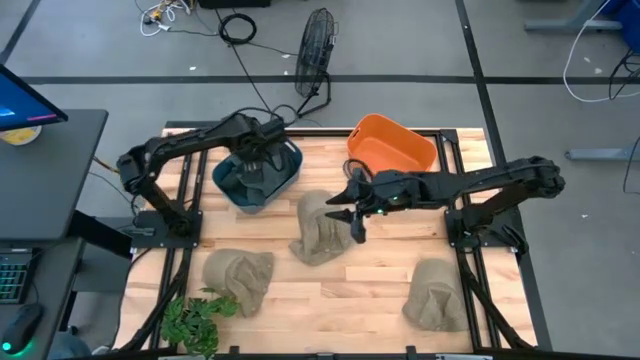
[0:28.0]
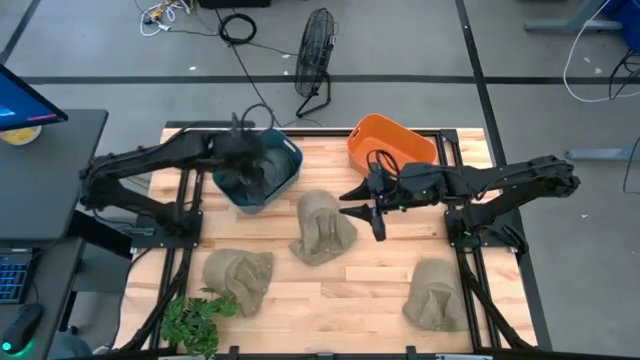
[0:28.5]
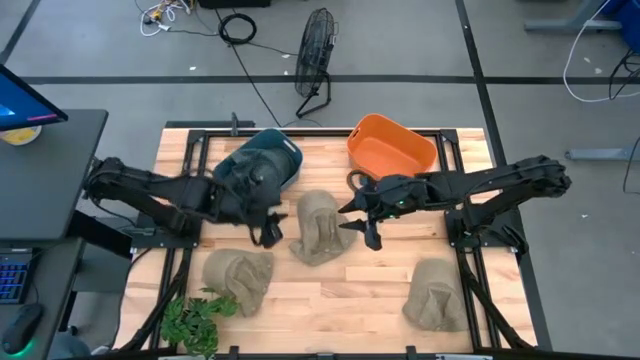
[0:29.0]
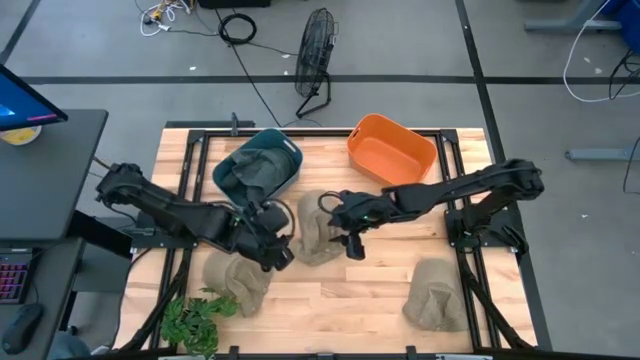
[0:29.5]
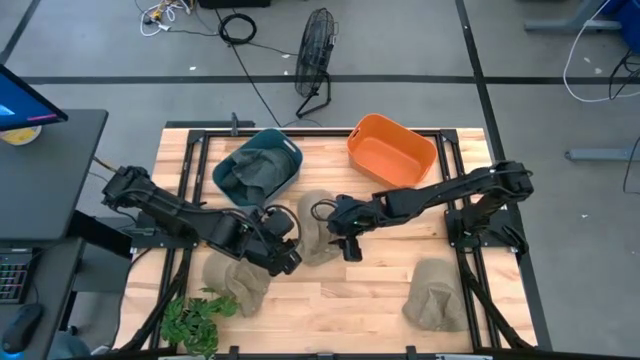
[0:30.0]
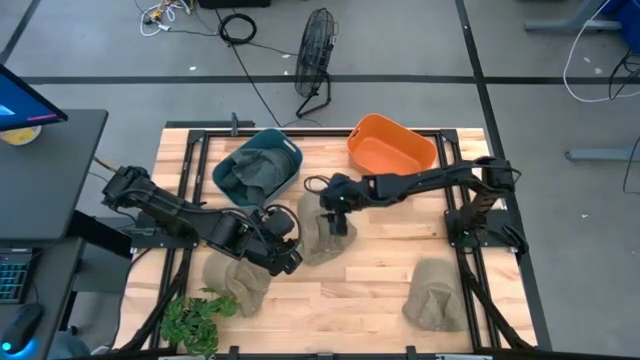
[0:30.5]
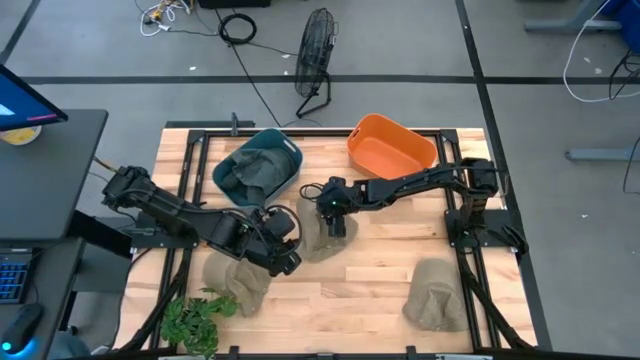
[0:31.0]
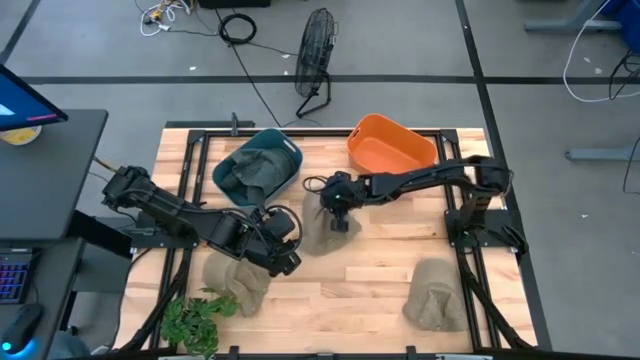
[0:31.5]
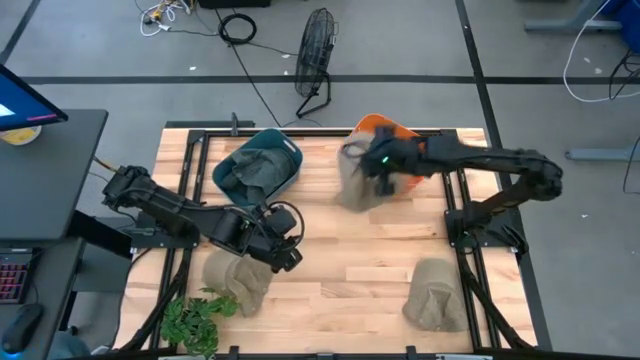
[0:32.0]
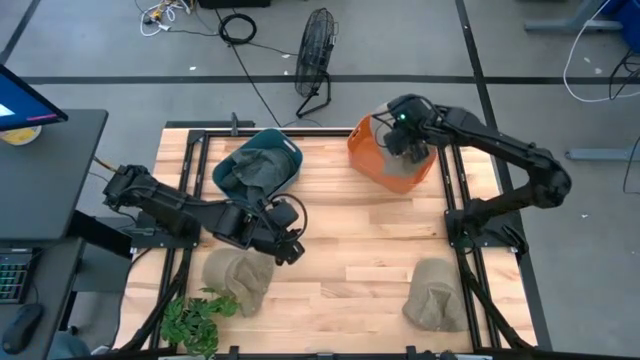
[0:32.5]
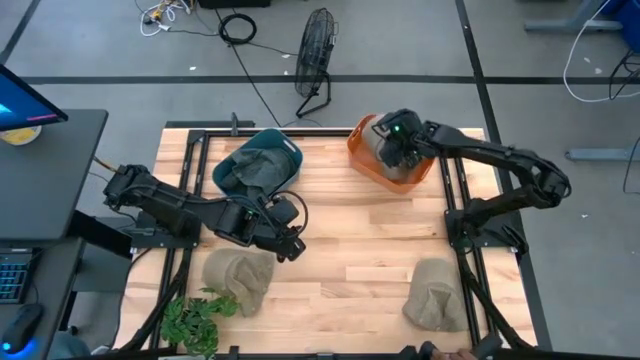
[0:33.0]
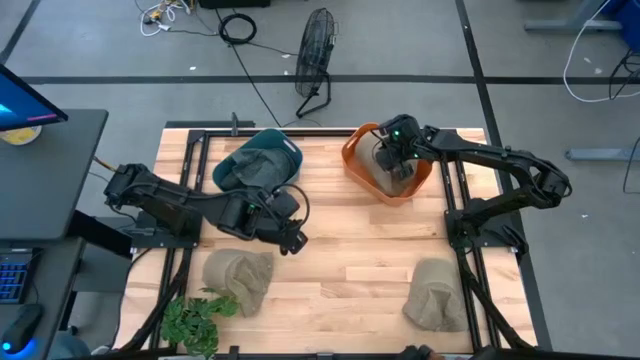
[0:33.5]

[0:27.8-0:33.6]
Task: Pick & Place hat
Put the top brown cap into the orange bin

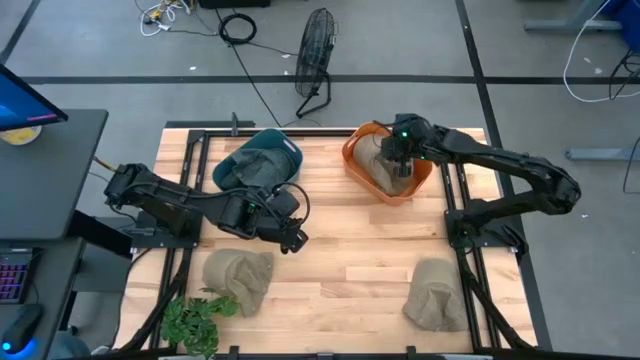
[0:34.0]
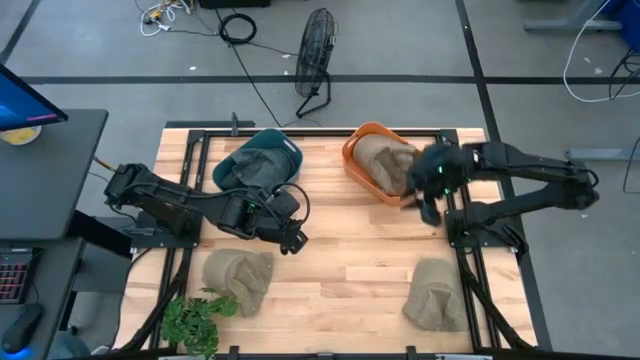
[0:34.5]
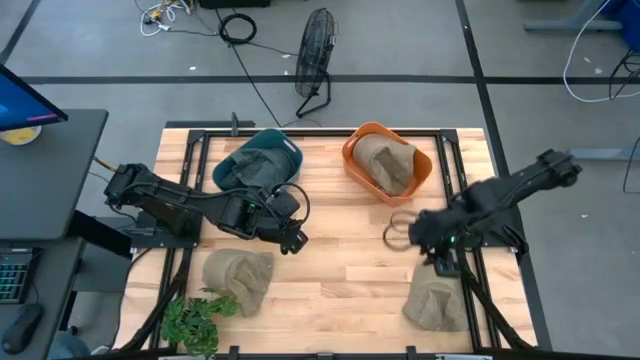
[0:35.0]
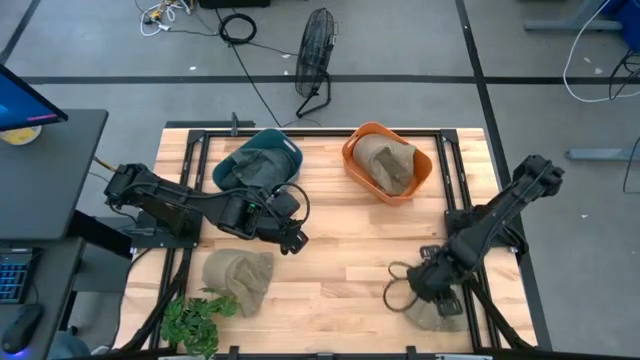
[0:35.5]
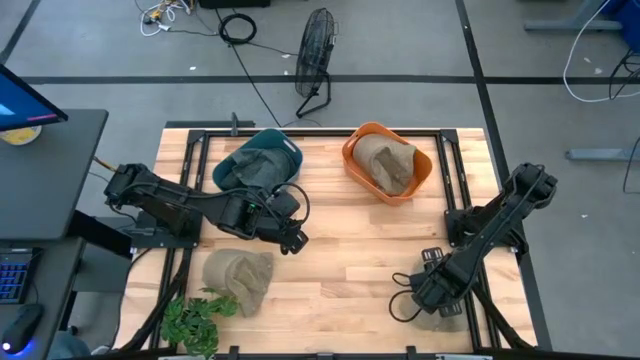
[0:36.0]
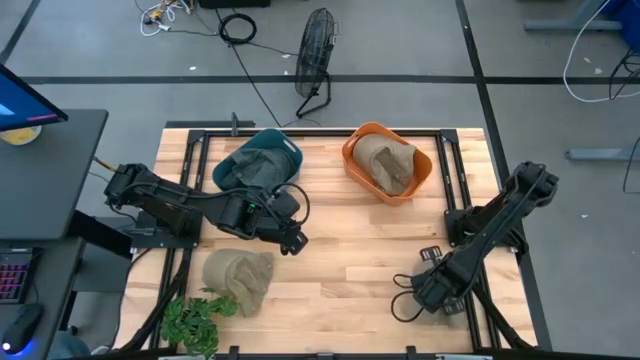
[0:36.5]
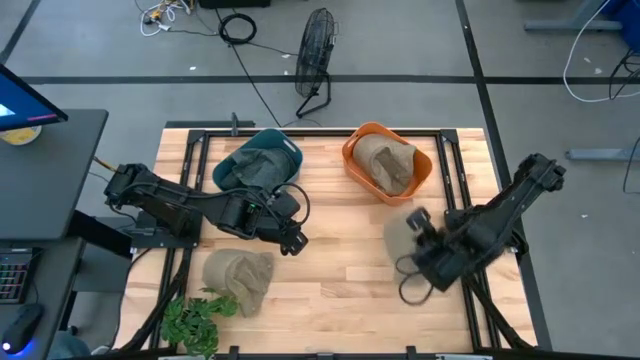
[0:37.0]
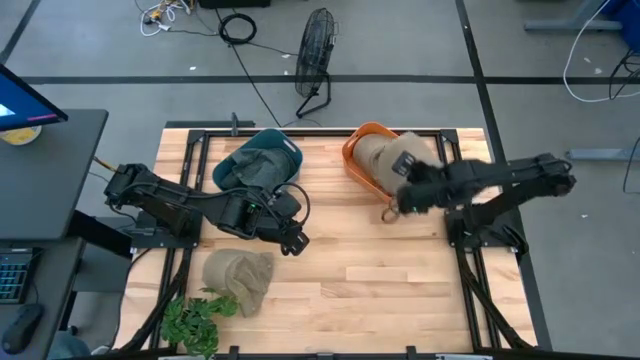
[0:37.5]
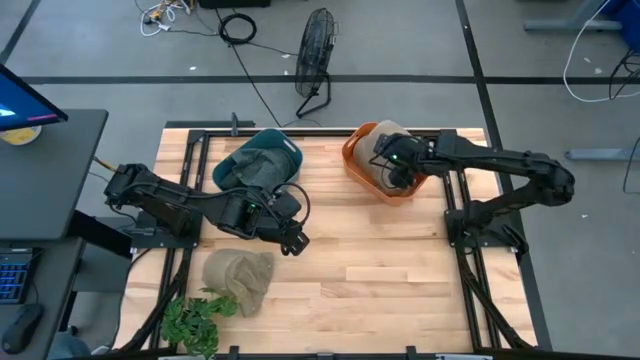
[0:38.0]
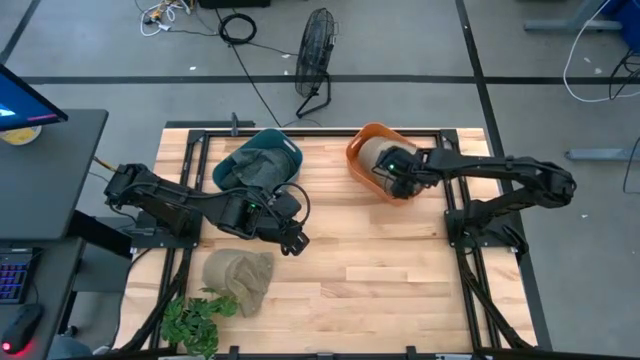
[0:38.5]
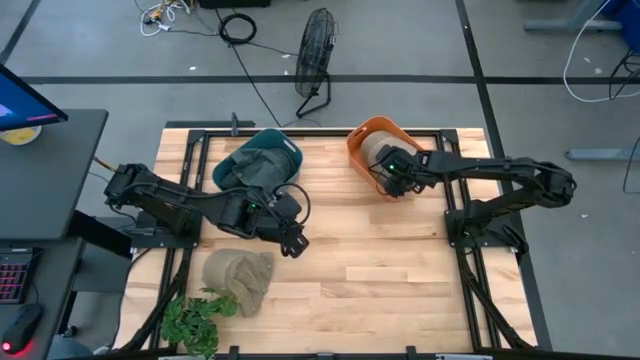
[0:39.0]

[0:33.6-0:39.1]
Put the right brown cap into the orange bin

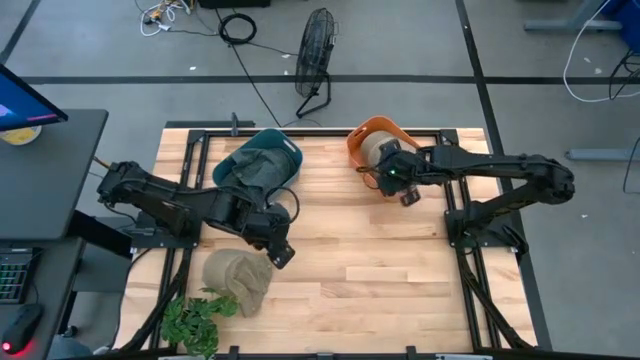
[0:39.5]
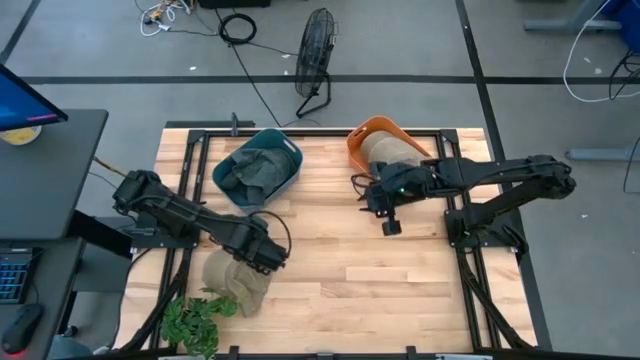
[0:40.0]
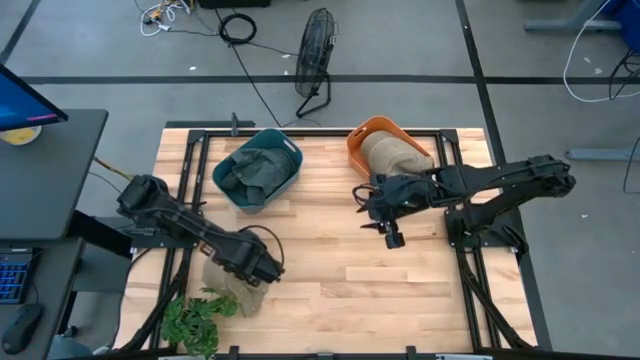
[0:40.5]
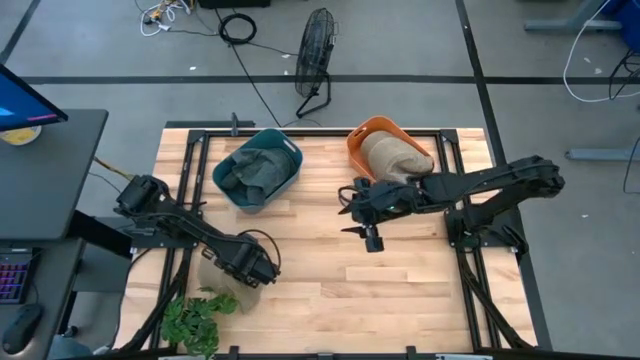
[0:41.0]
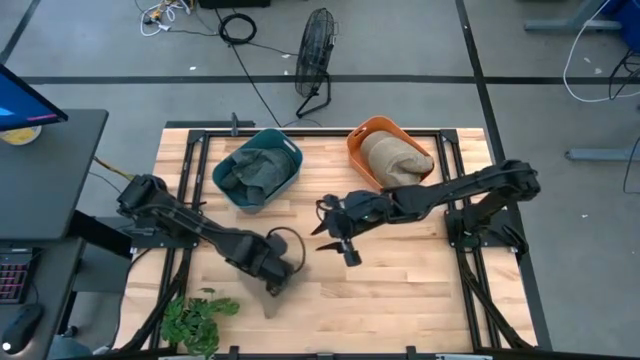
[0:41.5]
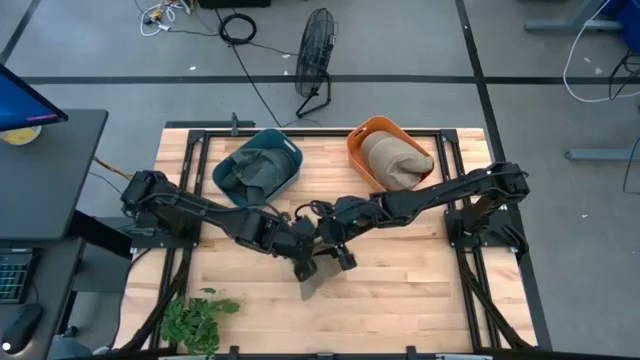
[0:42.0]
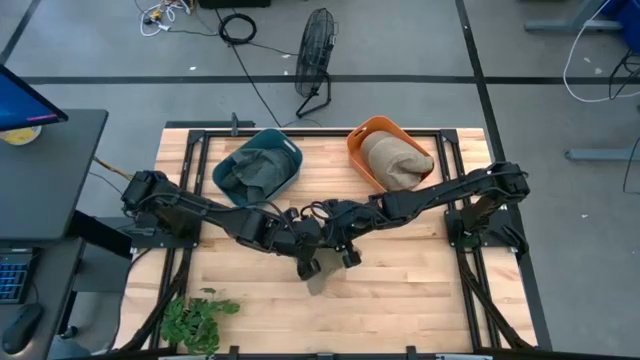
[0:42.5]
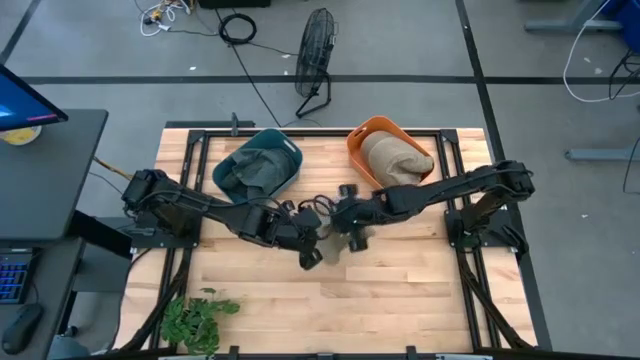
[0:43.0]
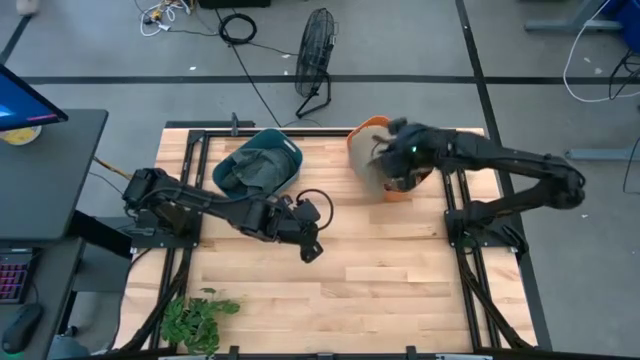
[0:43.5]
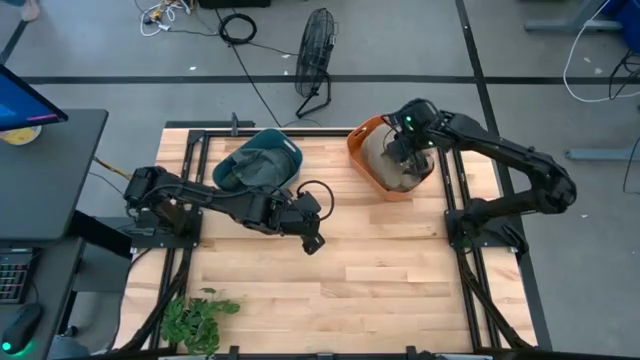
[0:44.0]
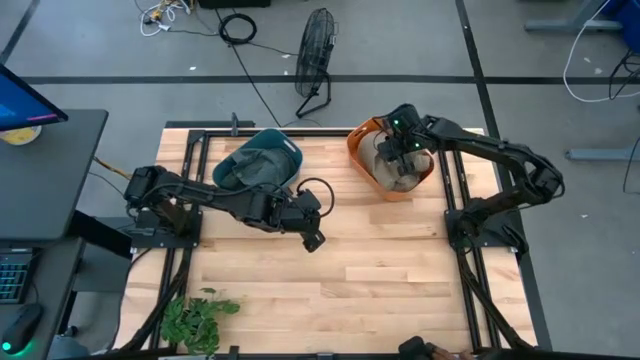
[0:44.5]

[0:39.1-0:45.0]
Put the brown cap into the orange bin

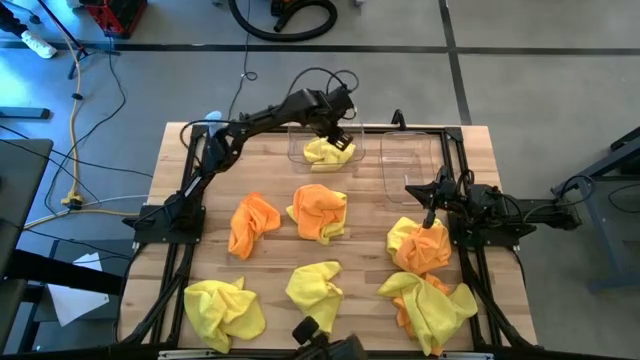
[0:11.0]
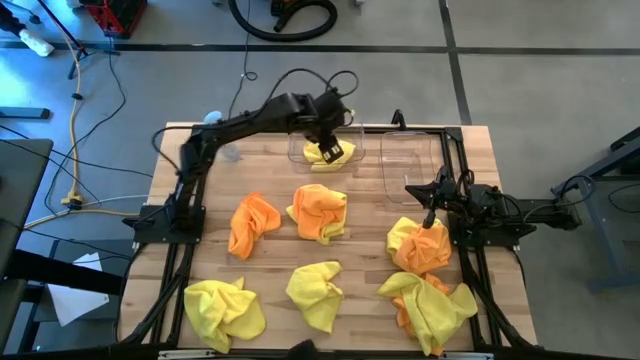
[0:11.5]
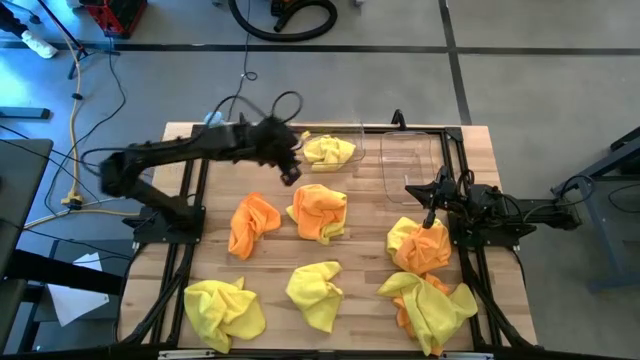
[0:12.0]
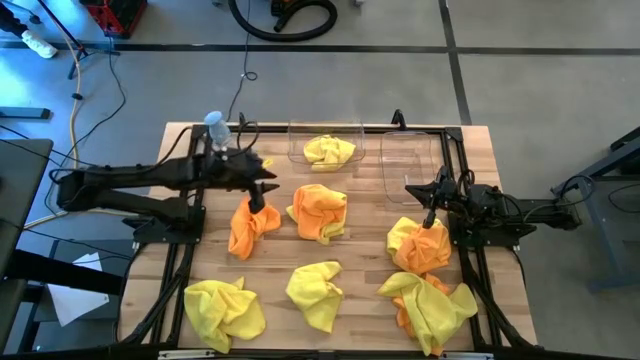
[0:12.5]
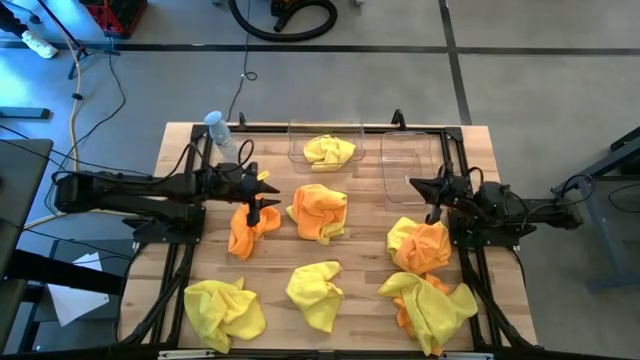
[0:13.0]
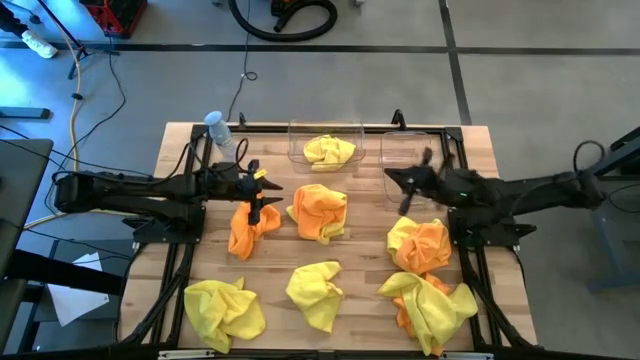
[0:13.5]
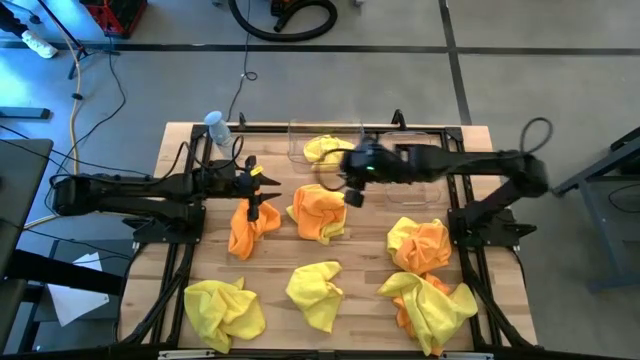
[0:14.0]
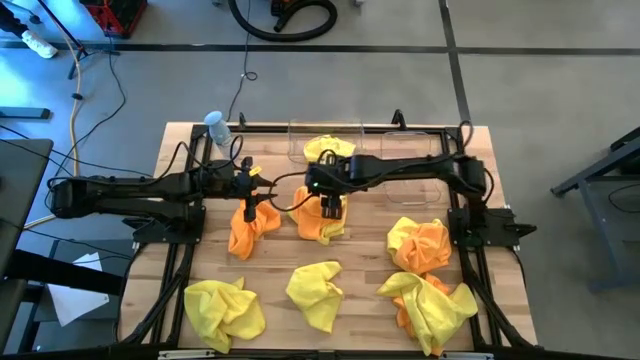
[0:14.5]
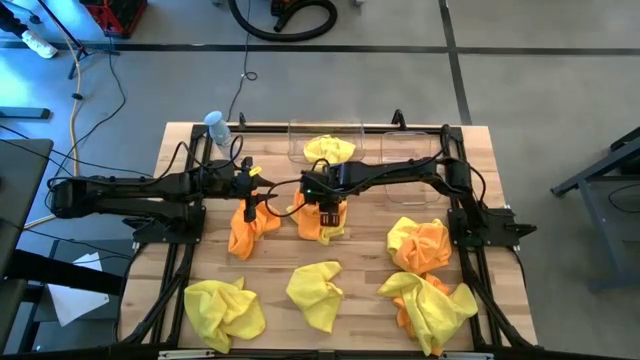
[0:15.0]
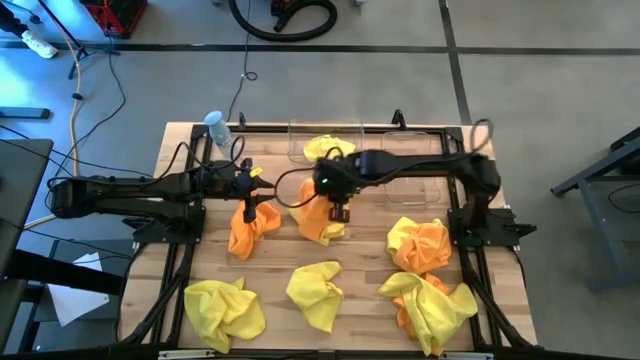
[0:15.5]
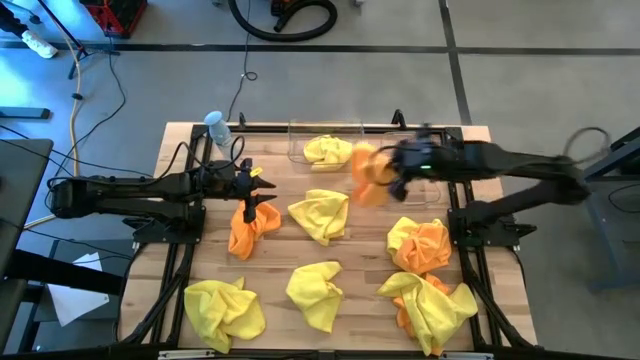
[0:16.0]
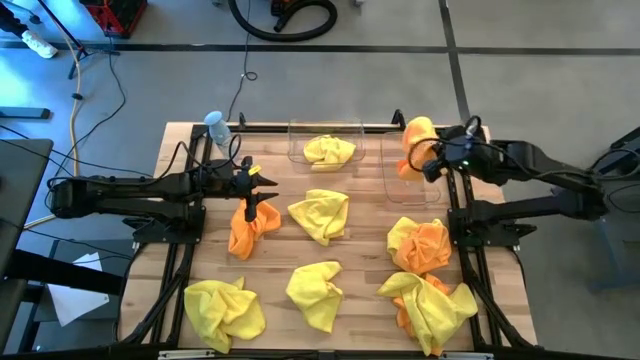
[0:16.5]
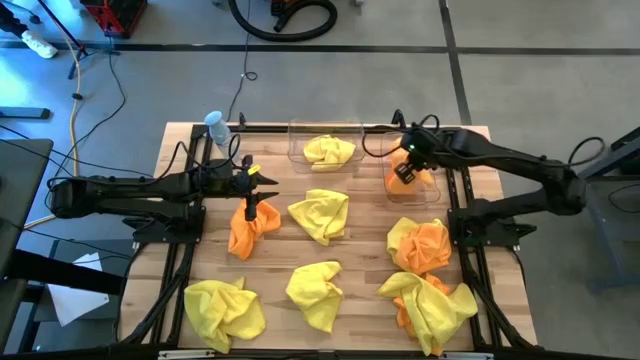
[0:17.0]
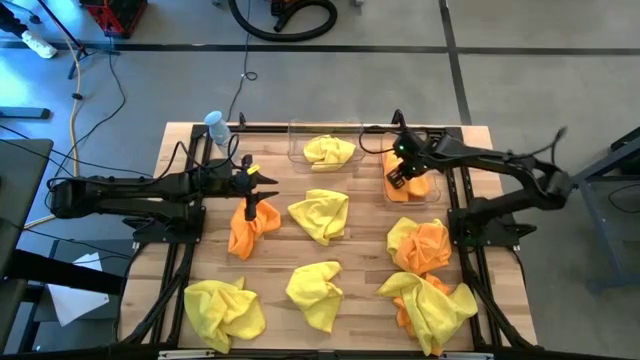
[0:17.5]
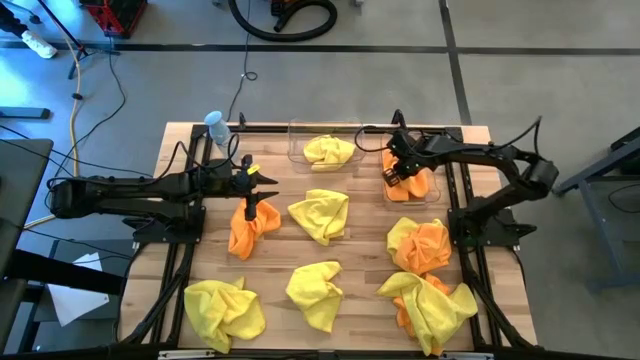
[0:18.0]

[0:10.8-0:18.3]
Task: Sort microfiber towel by color & place in baskets
Put the orange microfiber towel into the right transparent bin
